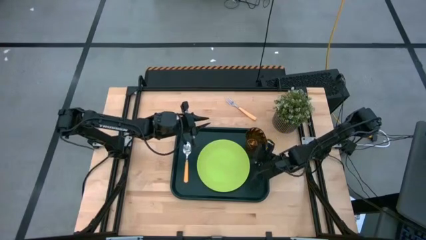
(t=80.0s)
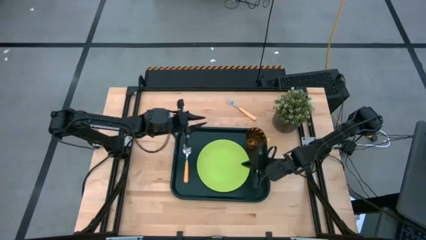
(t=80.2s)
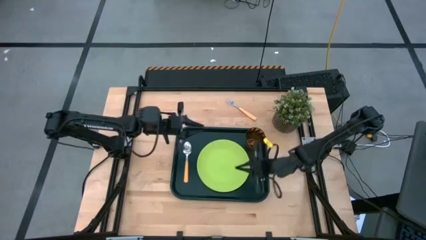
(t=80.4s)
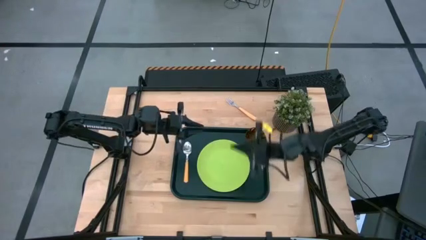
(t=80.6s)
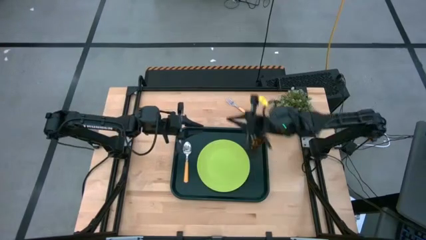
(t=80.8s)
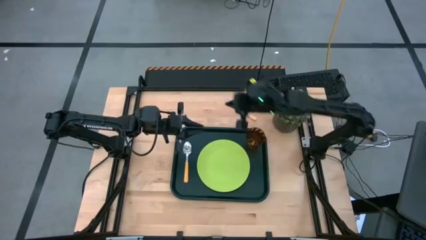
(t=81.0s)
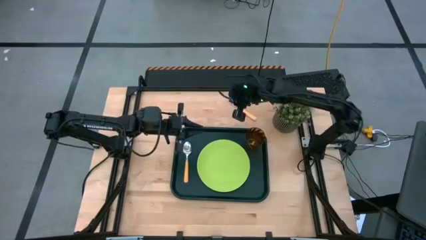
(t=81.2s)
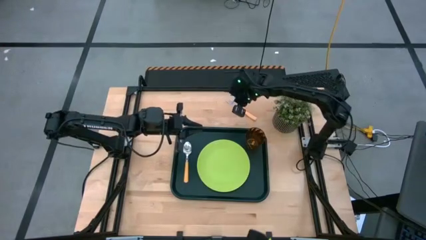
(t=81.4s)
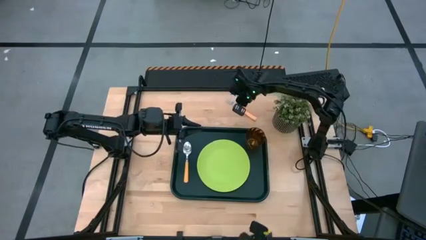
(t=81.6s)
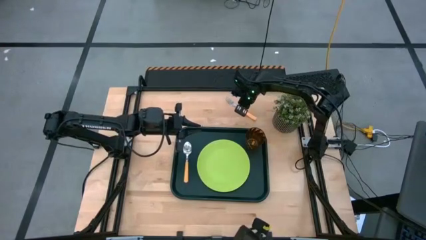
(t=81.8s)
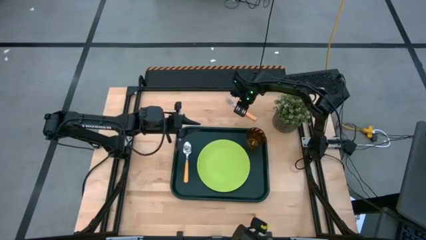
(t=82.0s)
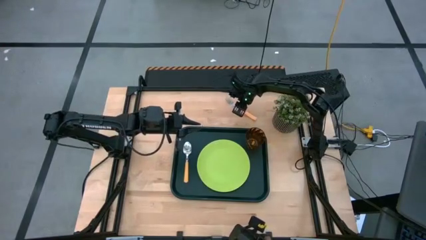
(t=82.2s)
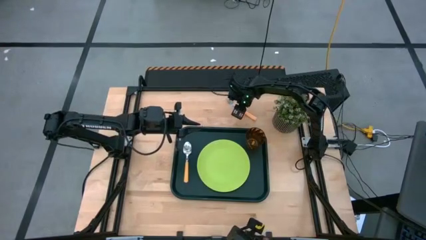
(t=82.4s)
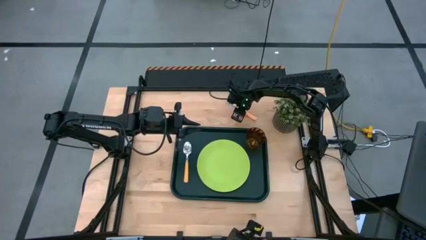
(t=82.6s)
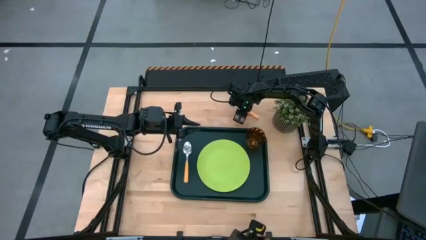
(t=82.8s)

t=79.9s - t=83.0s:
Task: Pick and place plate/cup/fork/spoon on tray
Put the orange fork on the black tray to the left of the orange spoon

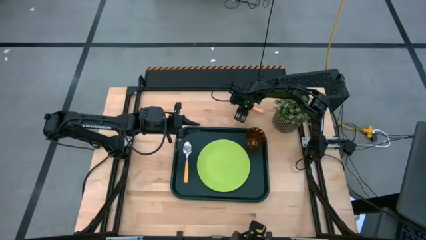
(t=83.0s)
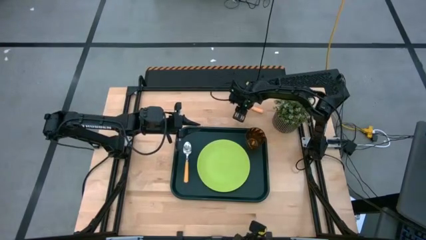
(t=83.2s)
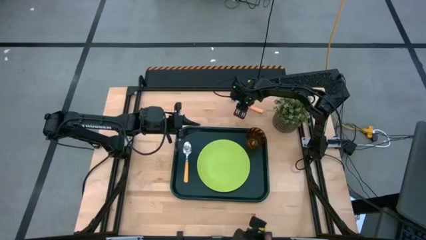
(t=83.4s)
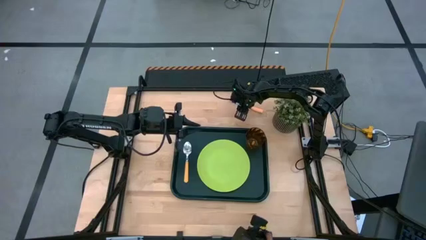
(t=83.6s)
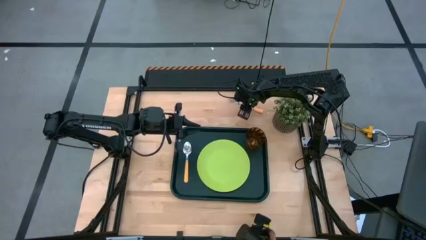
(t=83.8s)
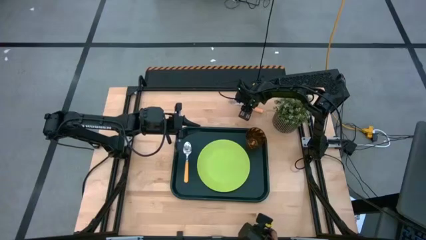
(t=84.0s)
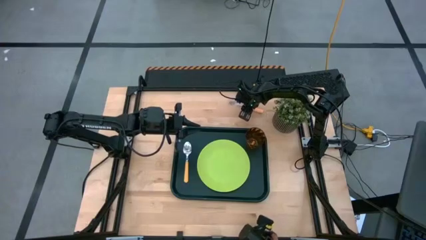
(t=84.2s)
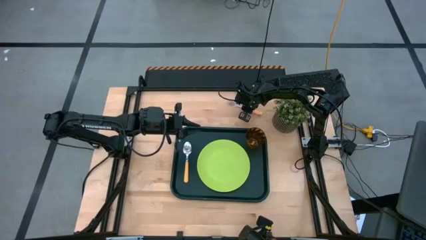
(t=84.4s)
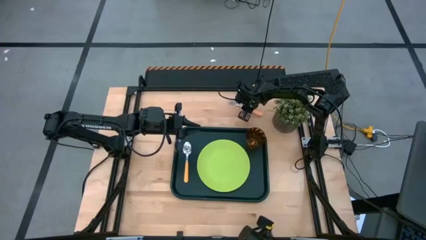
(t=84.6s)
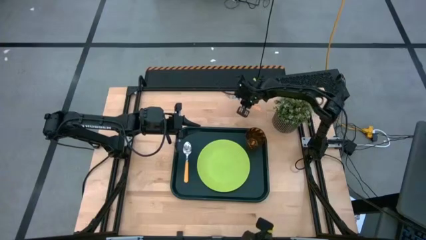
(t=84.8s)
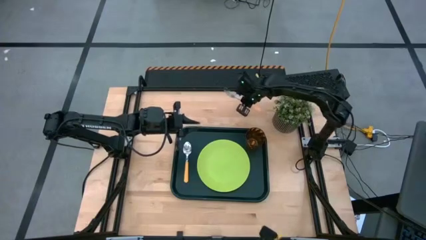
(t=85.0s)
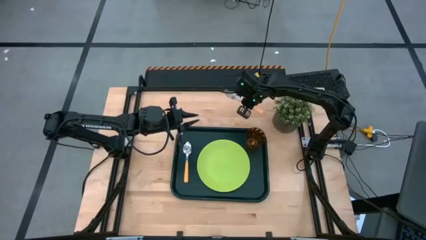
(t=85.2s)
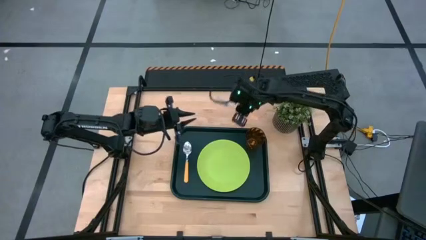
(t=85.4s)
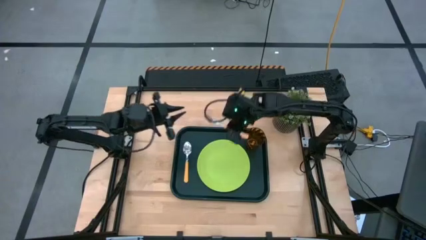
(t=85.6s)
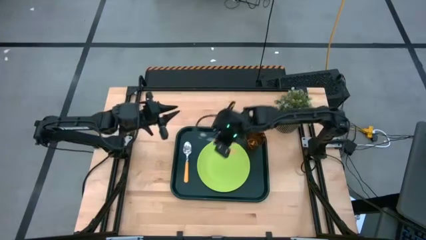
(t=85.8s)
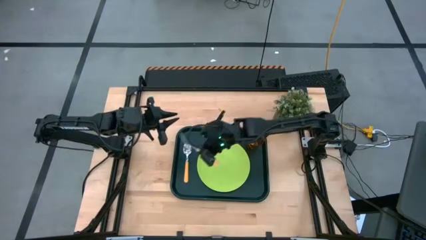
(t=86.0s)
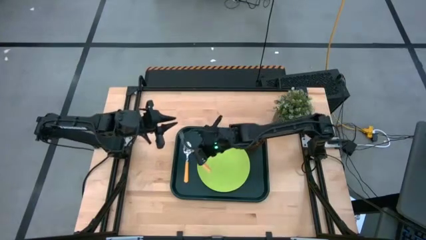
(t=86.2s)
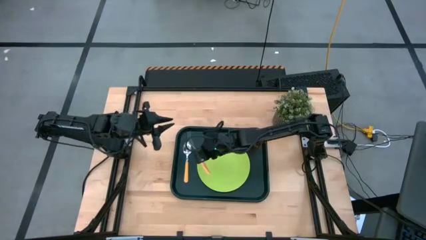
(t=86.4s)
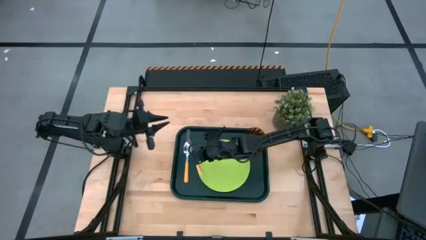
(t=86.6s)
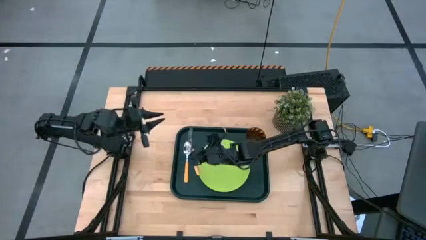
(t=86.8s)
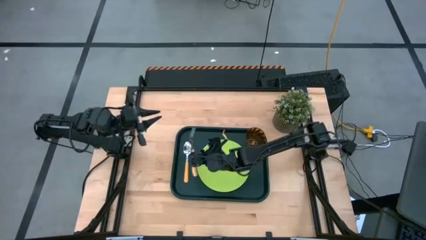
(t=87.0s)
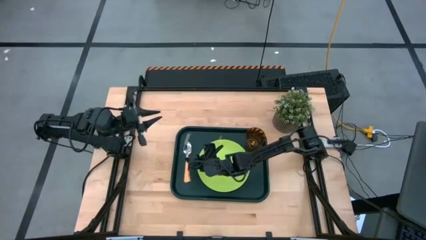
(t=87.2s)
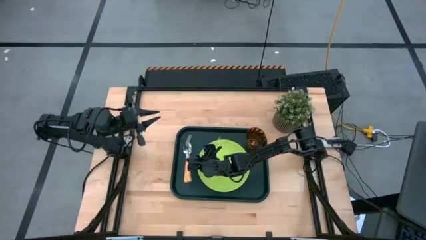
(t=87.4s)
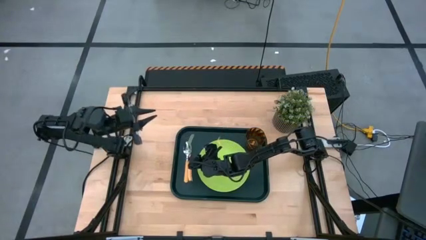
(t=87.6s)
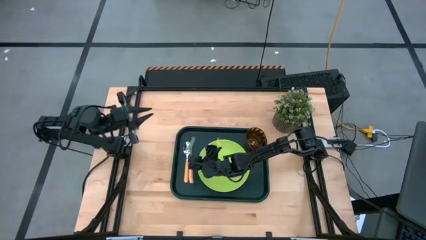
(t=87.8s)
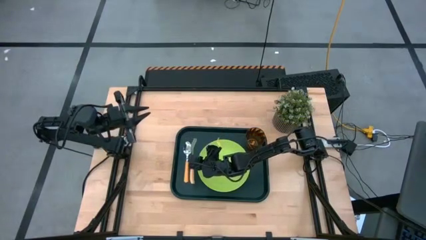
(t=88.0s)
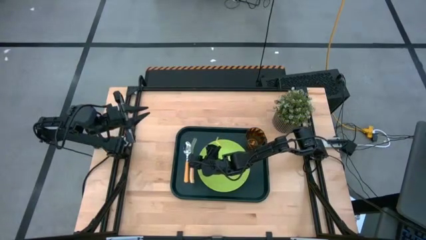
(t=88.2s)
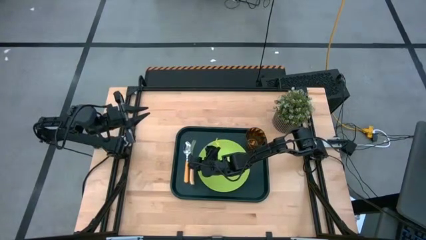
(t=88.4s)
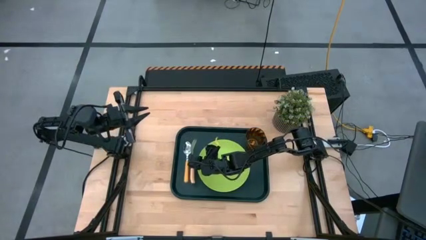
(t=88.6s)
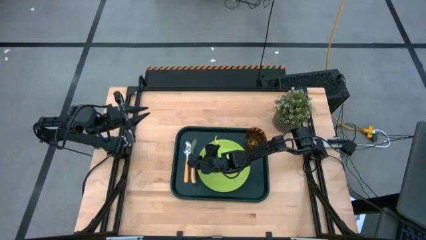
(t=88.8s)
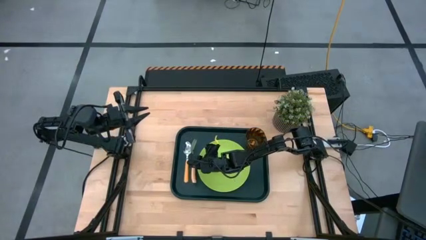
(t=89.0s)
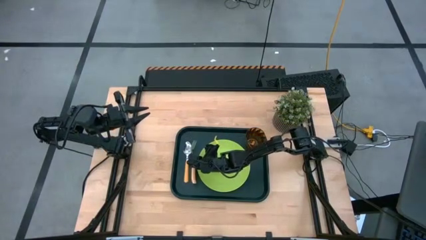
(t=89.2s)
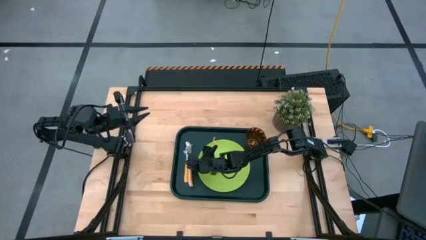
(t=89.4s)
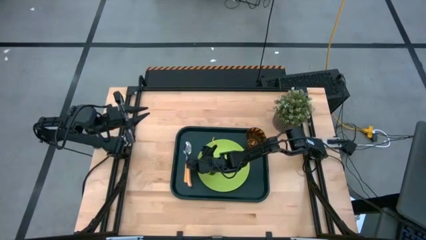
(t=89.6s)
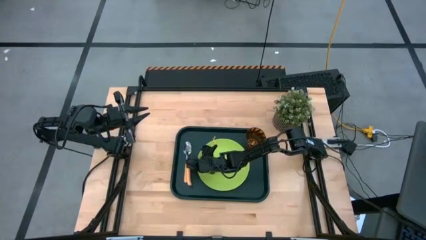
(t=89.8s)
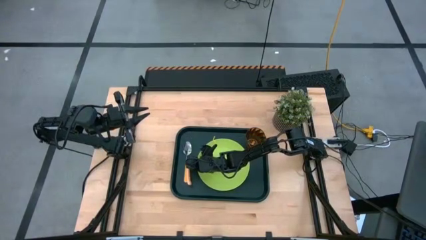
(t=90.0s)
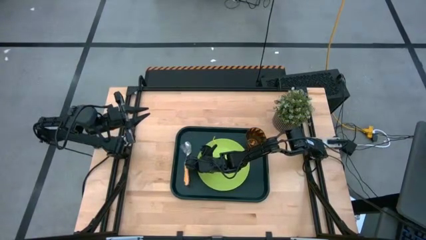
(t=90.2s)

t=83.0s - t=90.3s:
Put the orange fork on the black tray to the left of the orange spoon

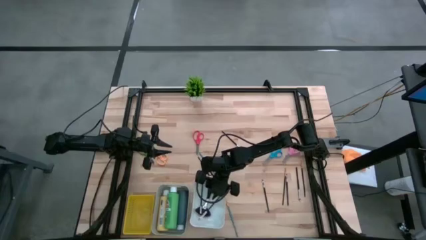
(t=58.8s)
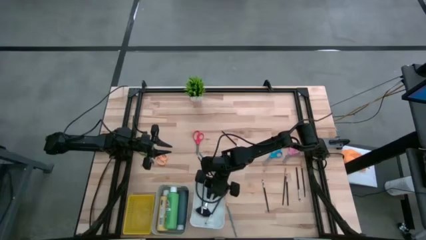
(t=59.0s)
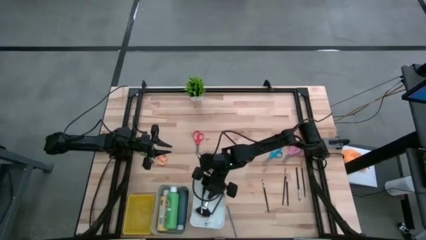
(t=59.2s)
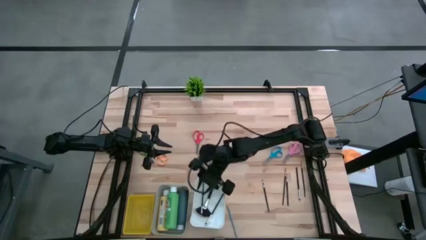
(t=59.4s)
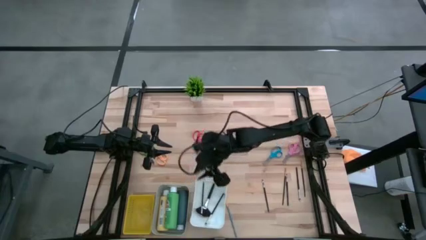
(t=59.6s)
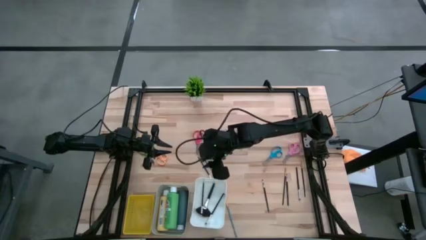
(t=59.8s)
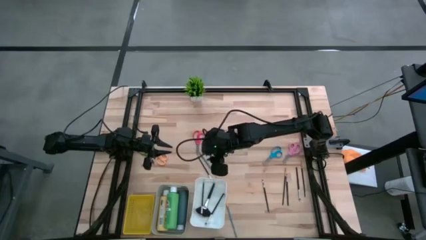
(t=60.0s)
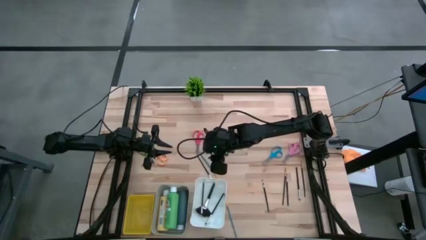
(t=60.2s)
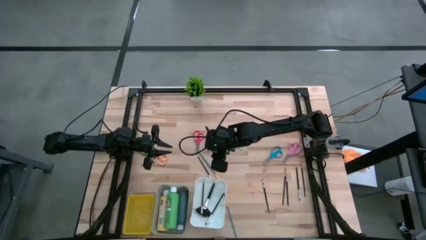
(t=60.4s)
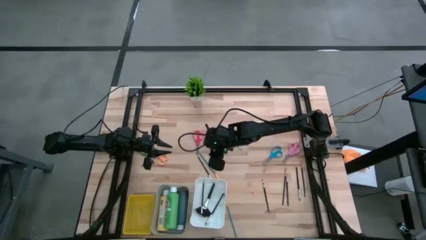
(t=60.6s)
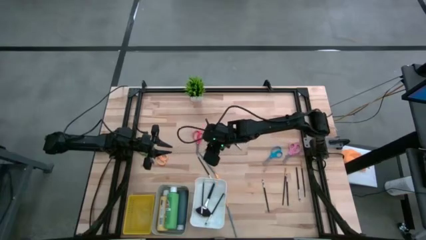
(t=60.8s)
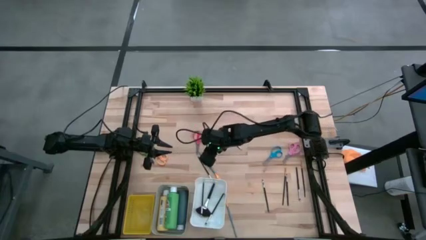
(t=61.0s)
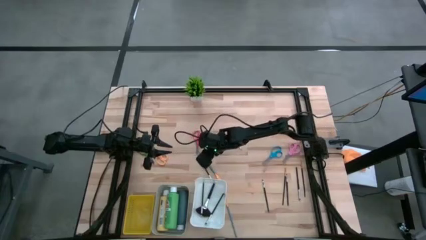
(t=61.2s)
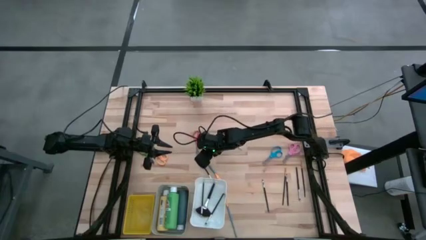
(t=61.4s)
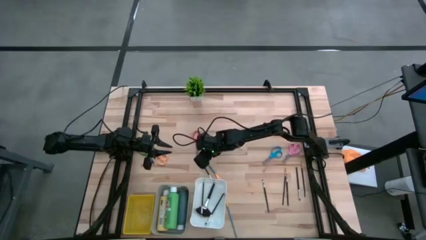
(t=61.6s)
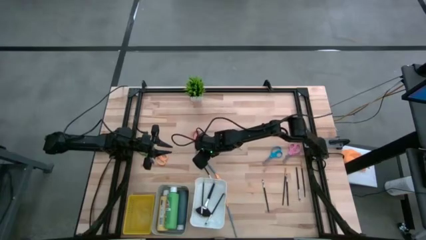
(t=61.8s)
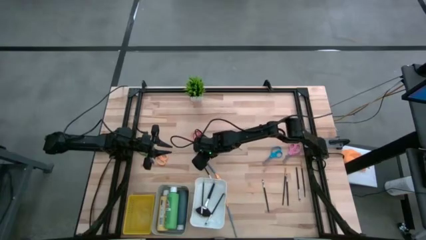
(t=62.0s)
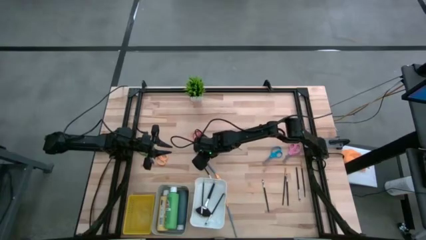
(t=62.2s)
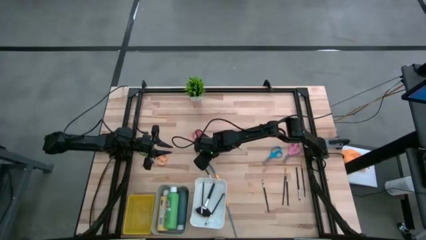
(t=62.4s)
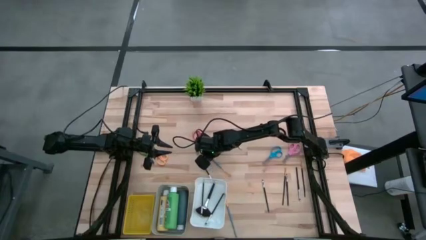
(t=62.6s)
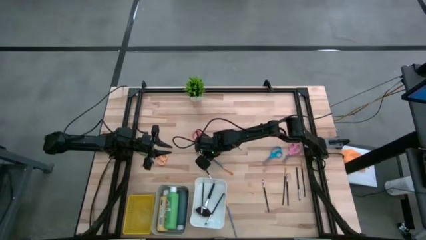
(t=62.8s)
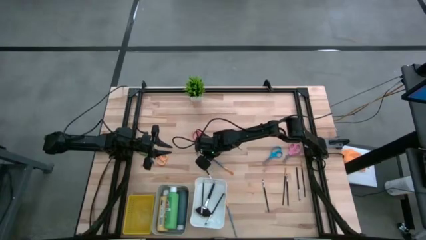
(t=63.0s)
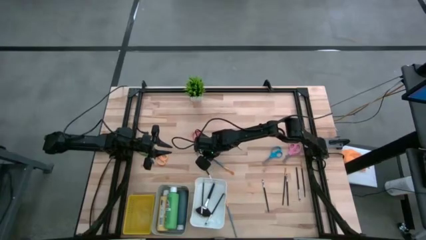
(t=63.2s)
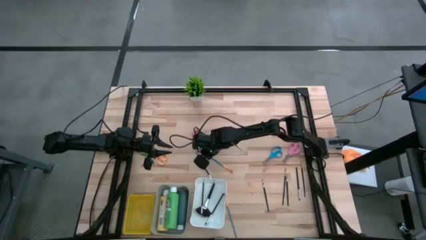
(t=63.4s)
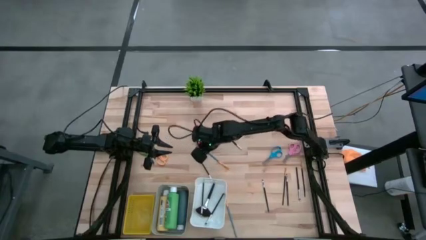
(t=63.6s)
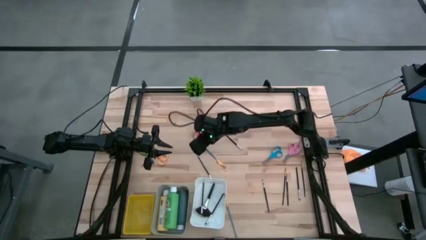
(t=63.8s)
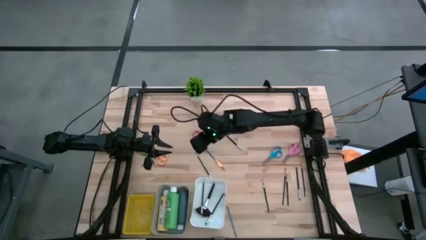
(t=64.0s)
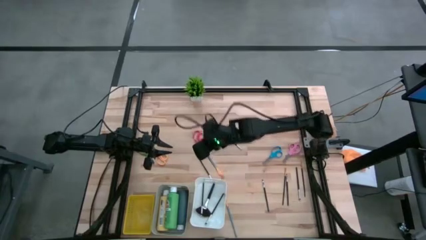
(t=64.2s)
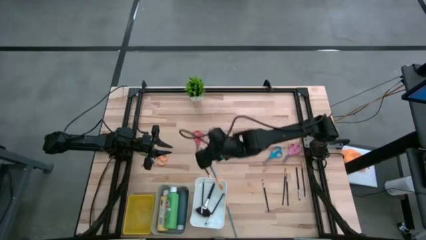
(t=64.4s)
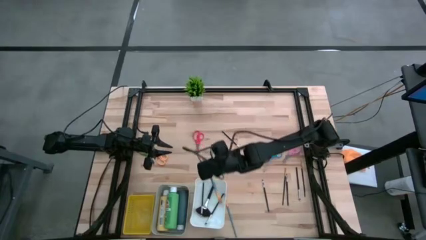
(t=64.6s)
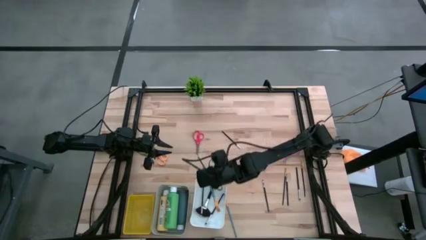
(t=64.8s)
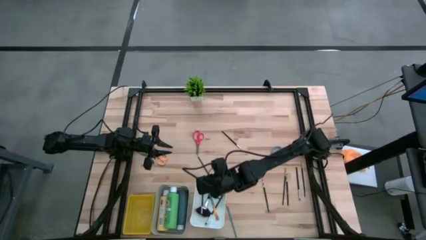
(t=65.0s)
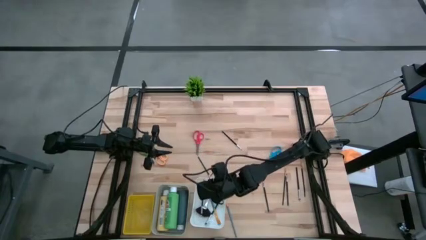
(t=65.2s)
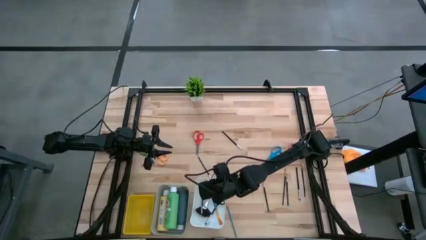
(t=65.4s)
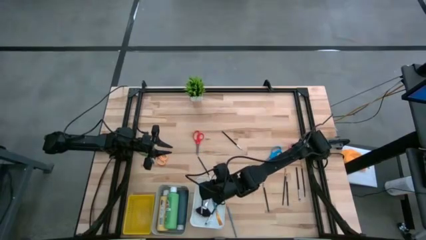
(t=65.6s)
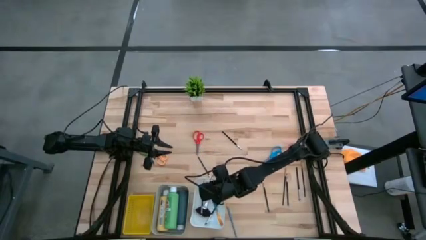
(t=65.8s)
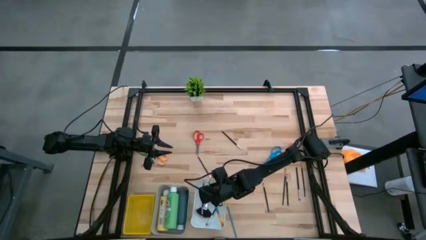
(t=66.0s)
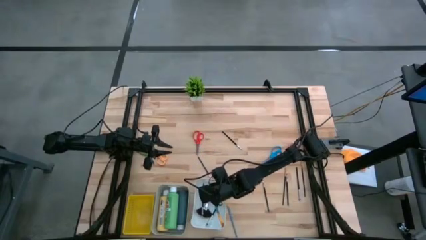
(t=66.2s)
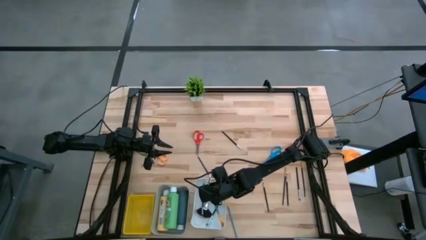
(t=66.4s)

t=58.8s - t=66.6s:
Task: Pick & Place Paint Supplies
Put the blue paint brush into the white bin
